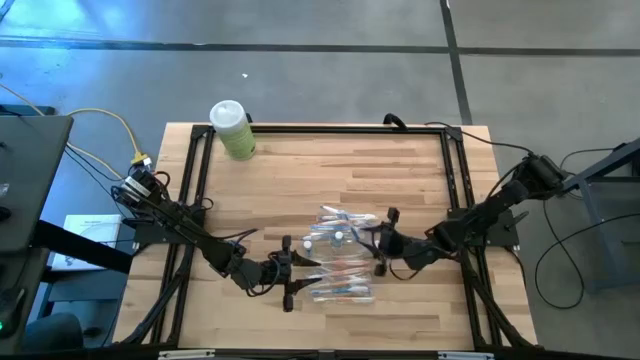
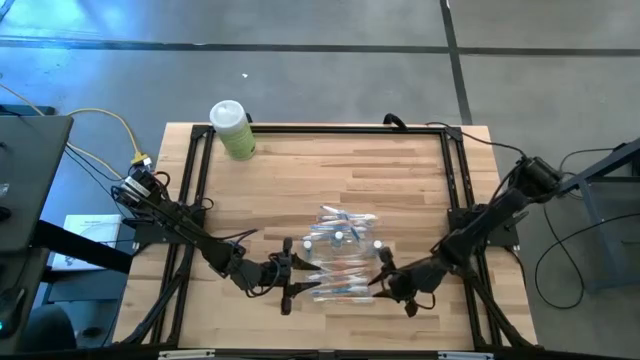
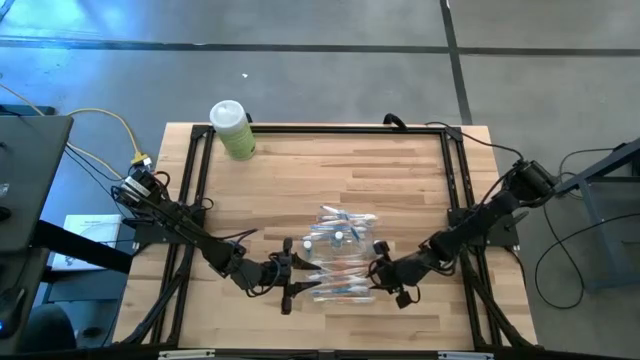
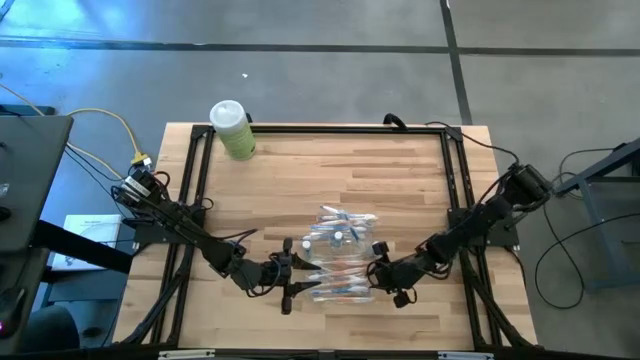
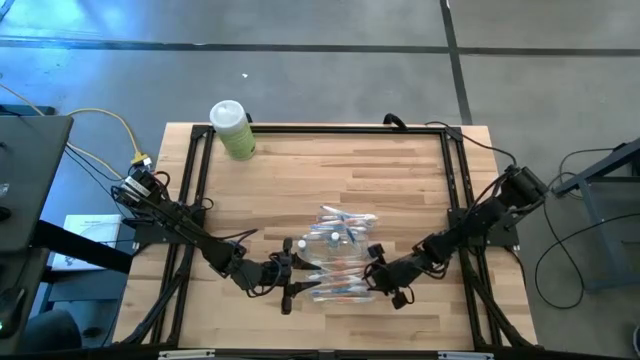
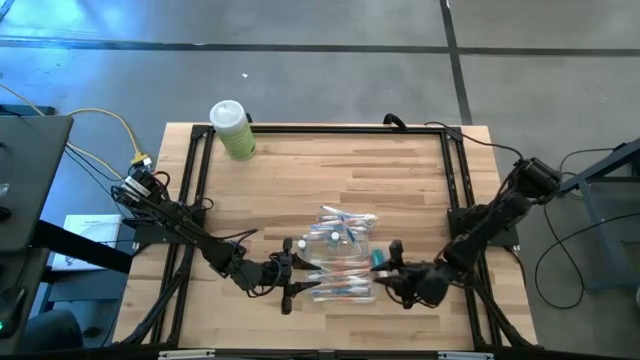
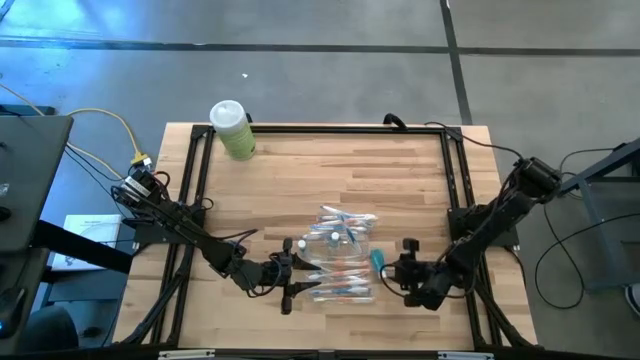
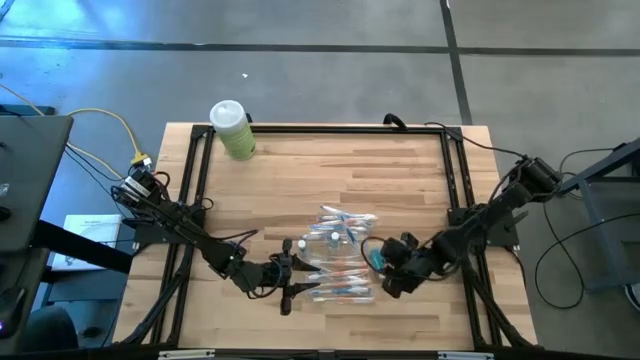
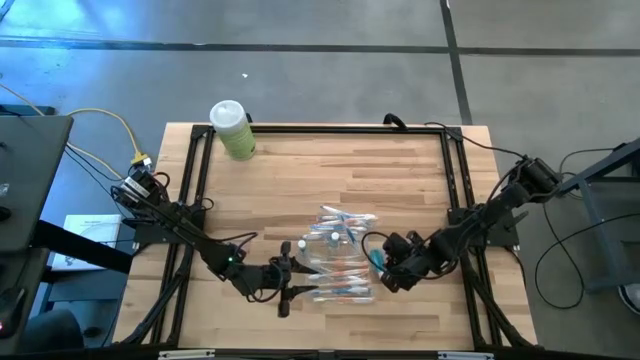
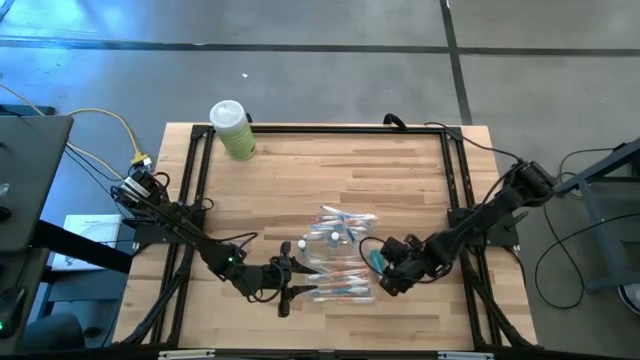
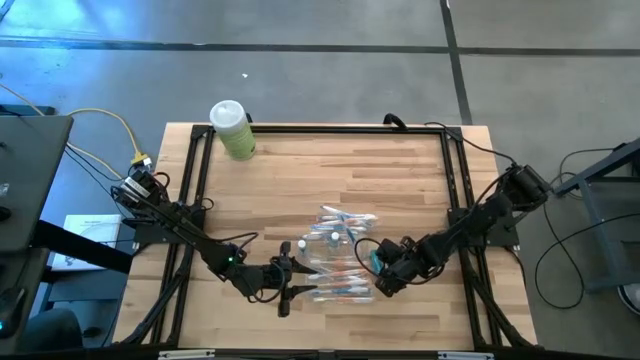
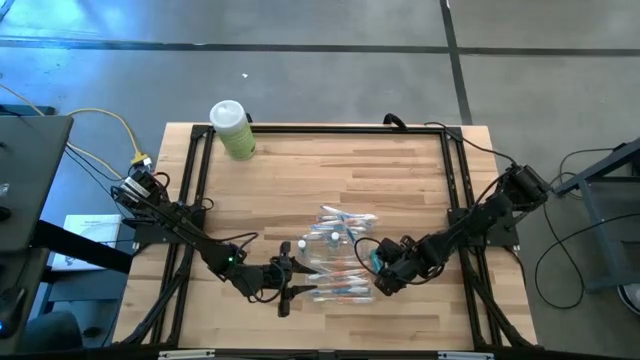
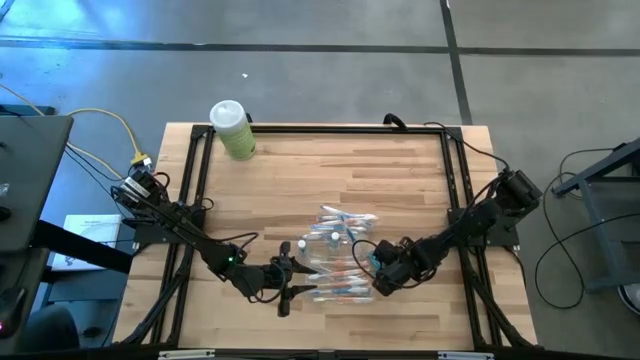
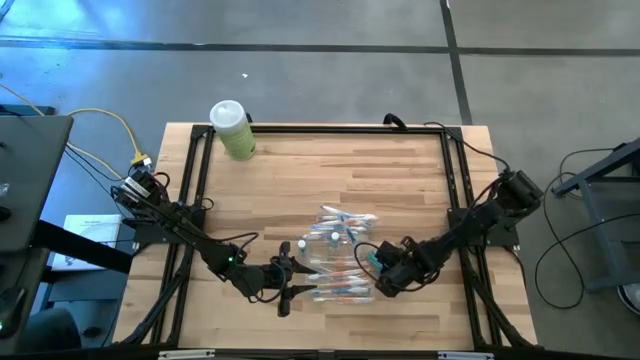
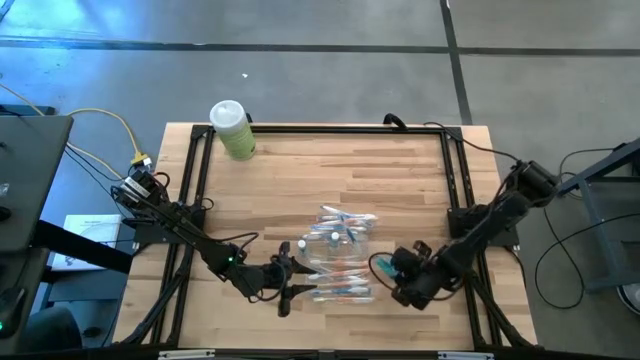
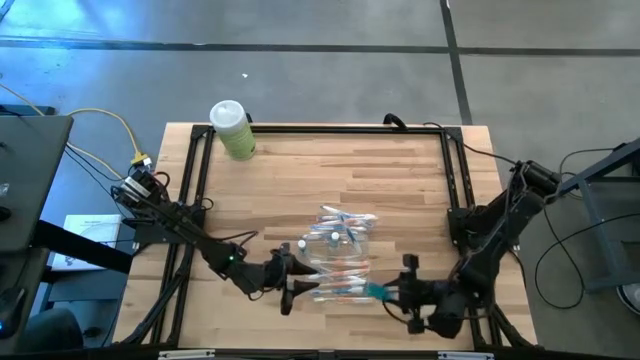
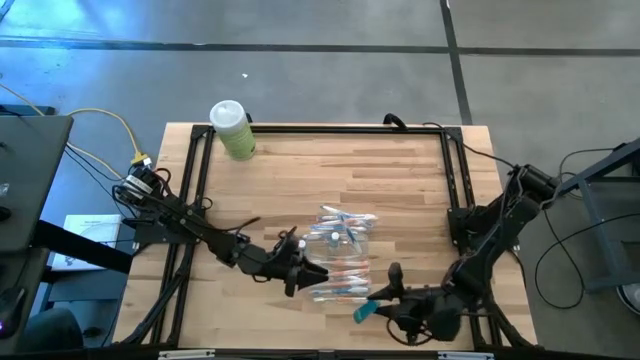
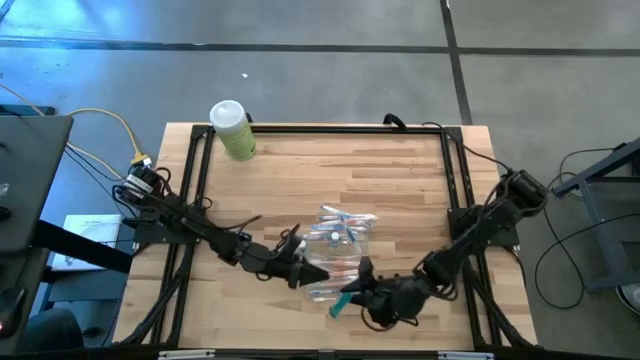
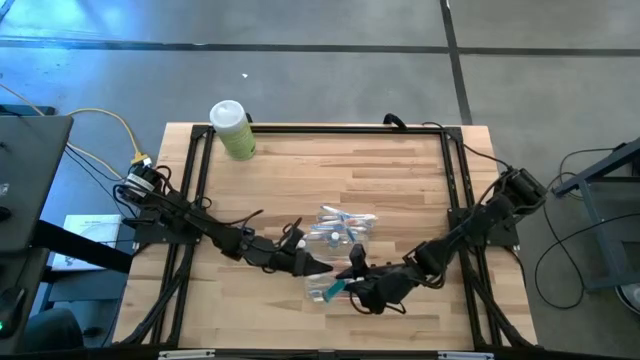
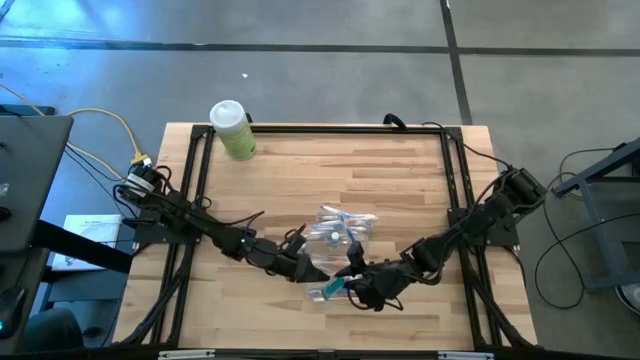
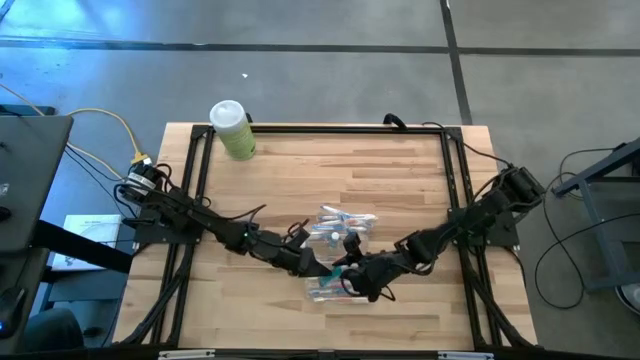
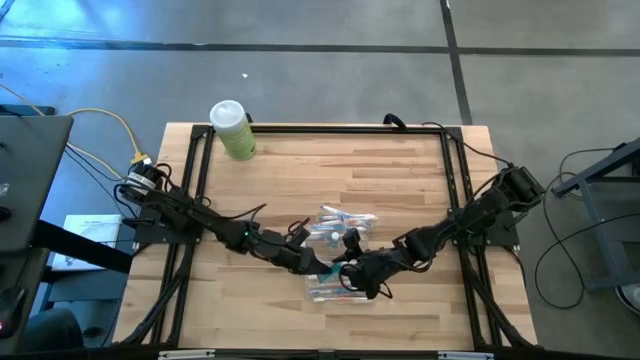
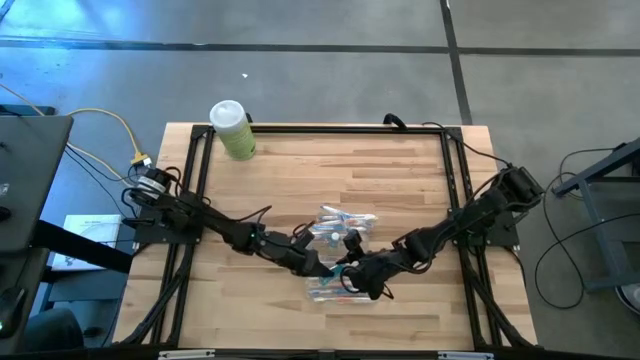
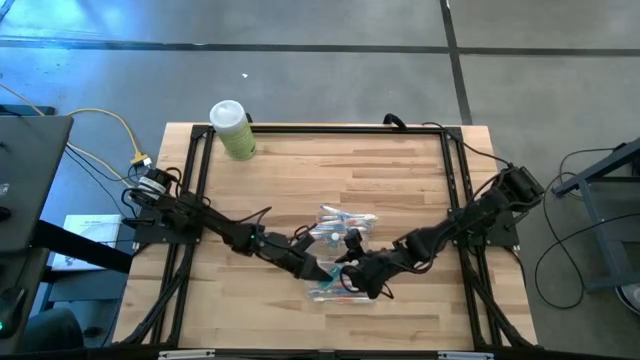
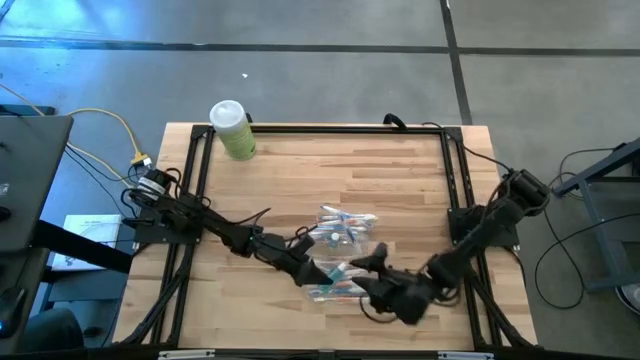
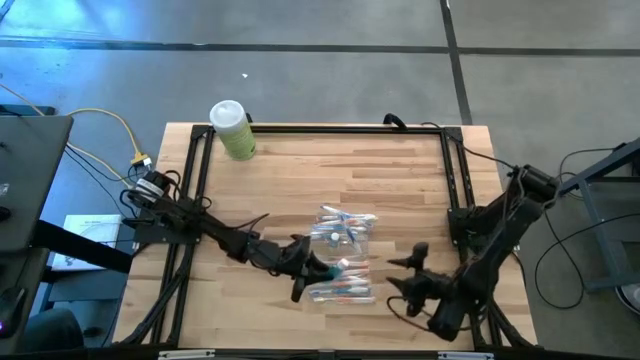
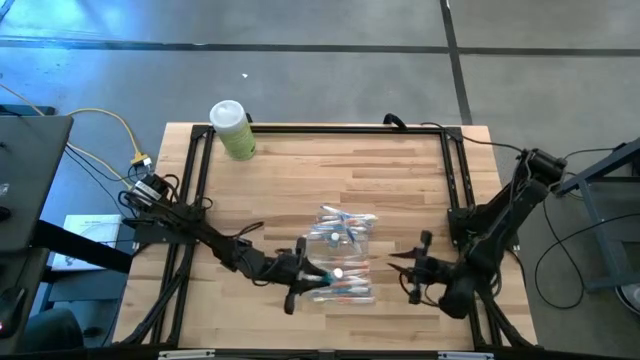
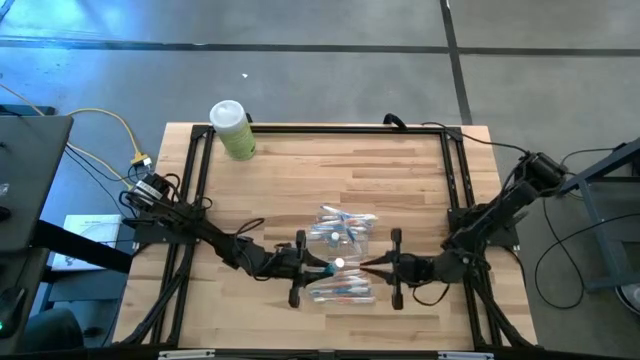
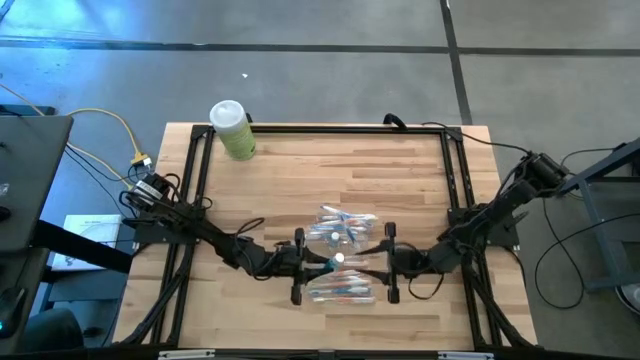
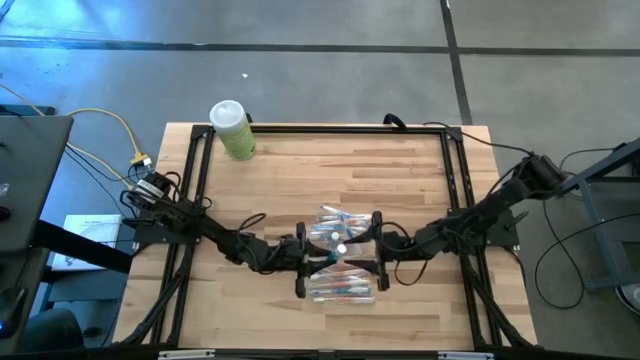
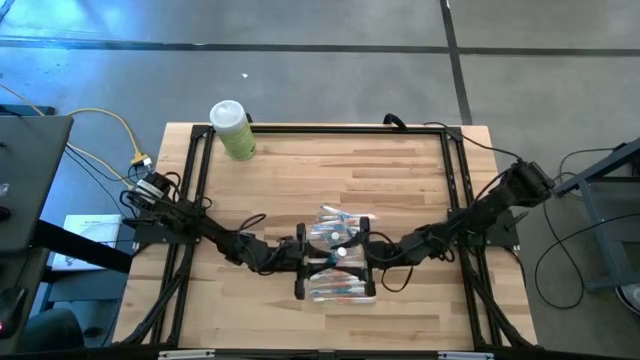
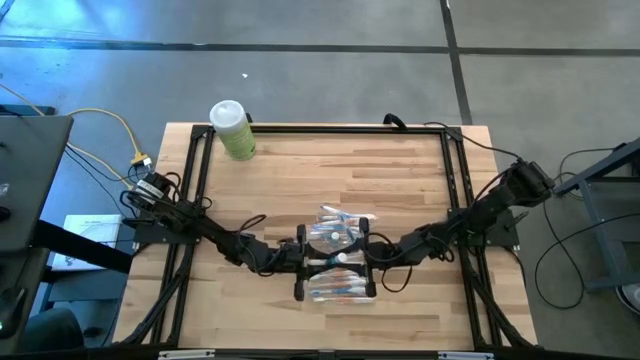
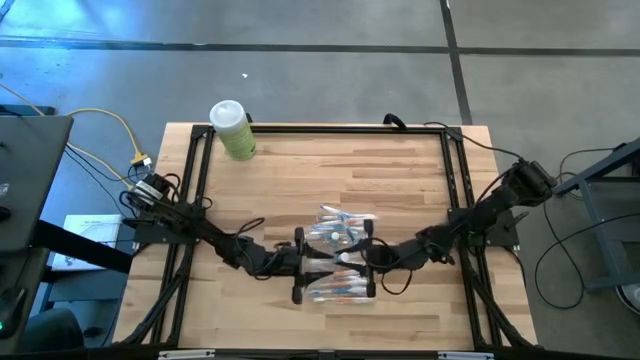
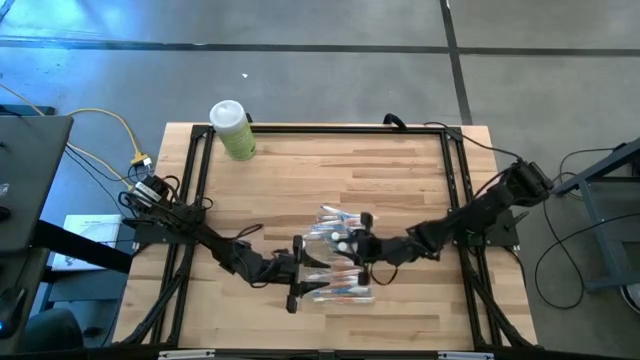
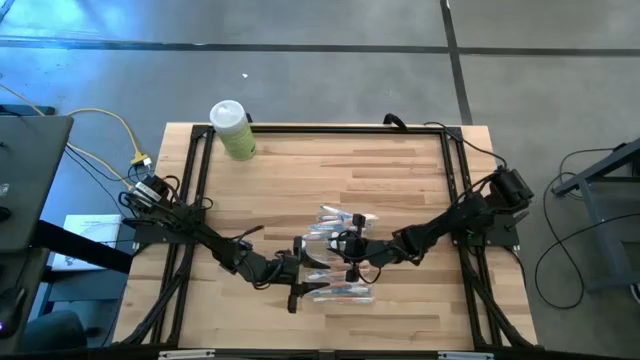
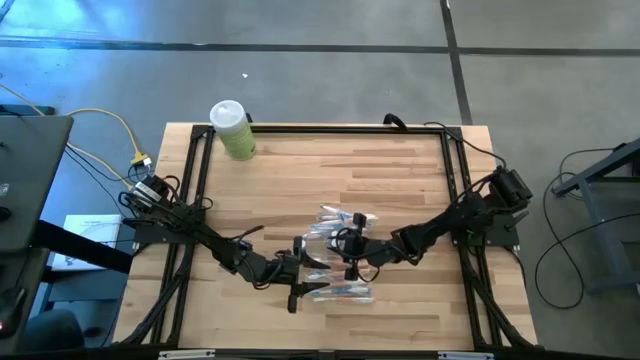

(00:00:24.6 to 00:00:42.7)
Task: Pick & Place toothbrushing station
Put the mouthwash into the transparent organizer

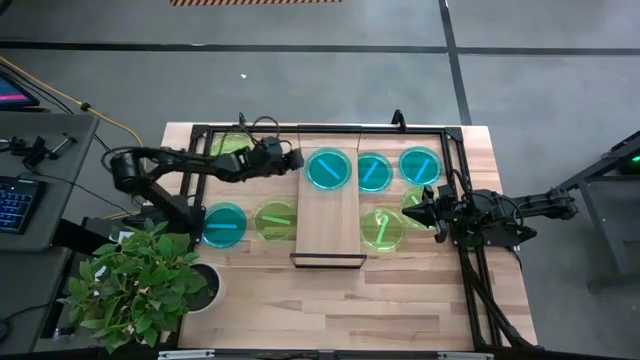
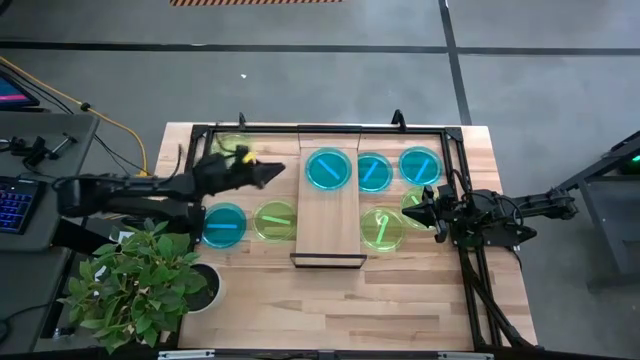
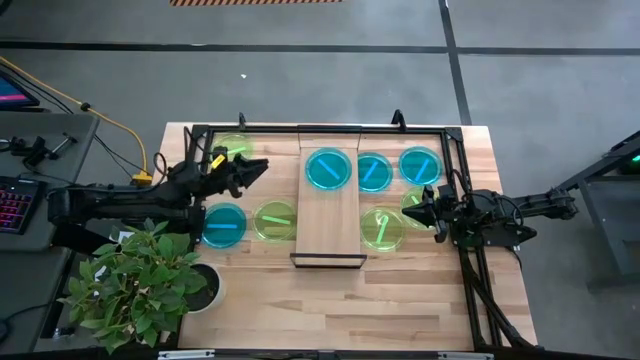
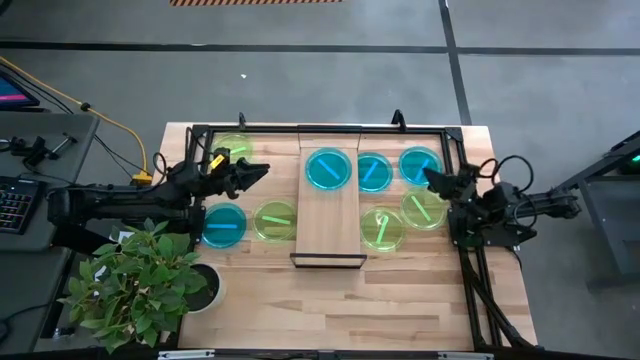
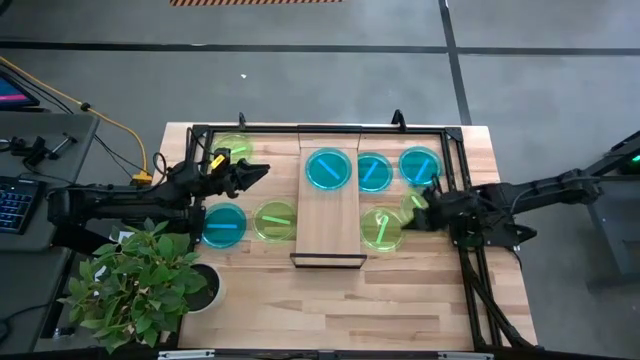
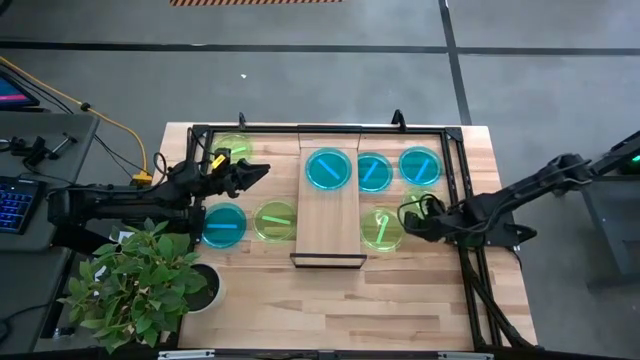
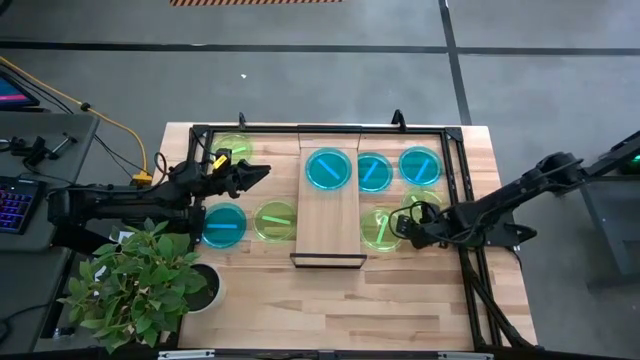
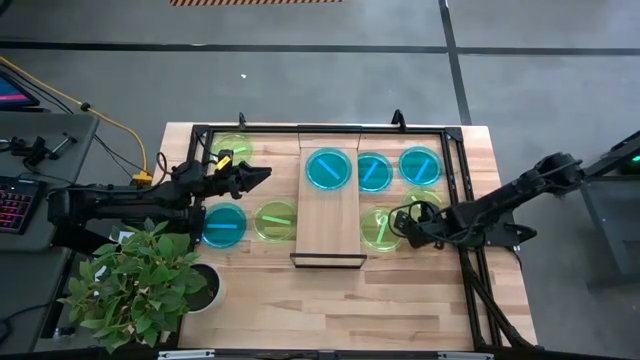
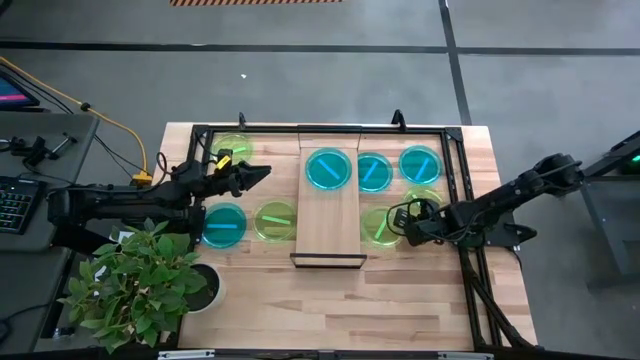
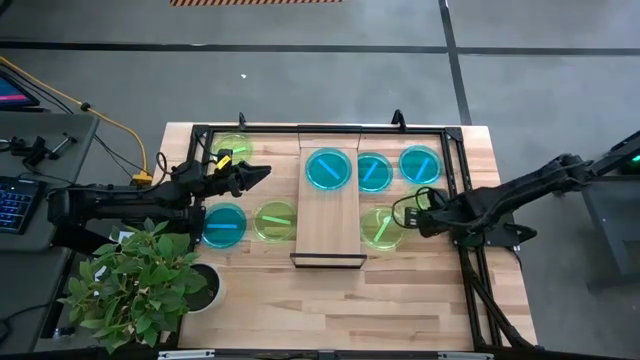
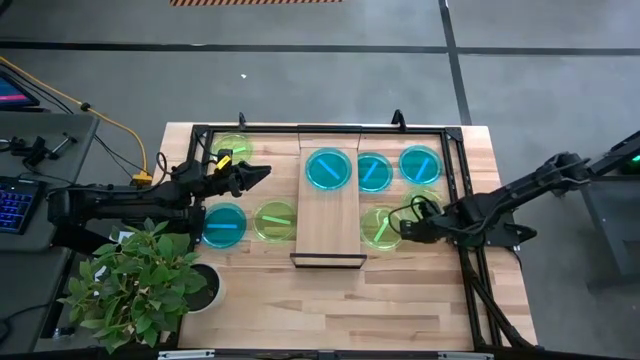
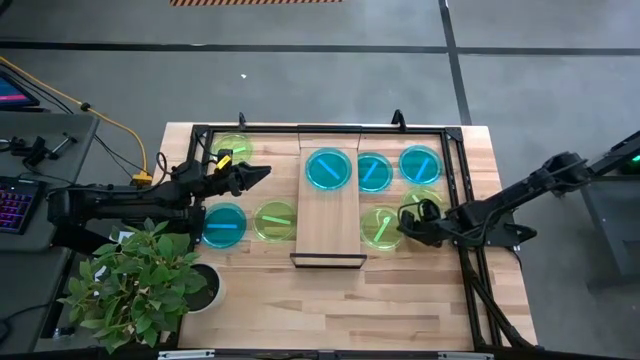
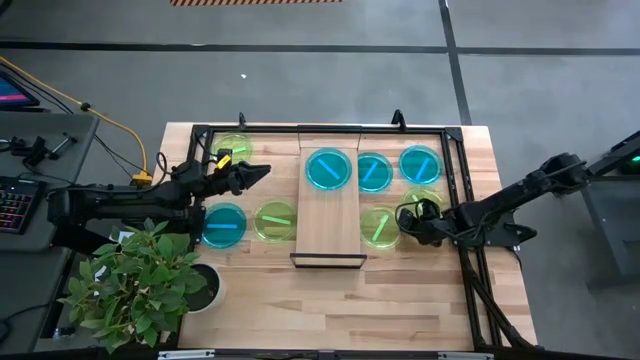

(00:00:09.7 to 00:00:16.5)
Task: Place and stack plates onto a shelf
Put the green plate on the shelf
